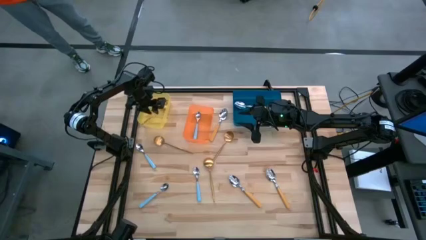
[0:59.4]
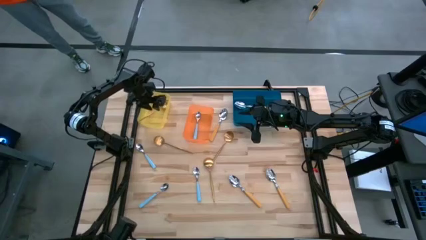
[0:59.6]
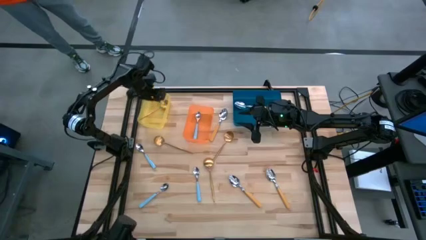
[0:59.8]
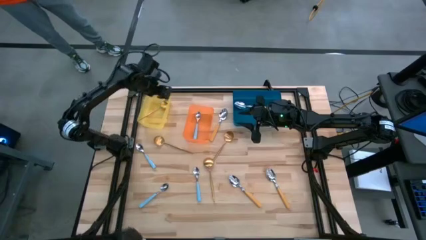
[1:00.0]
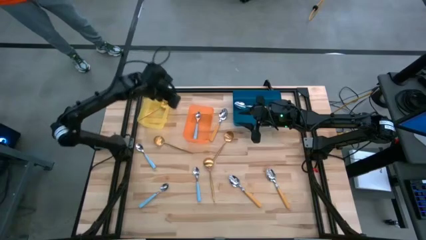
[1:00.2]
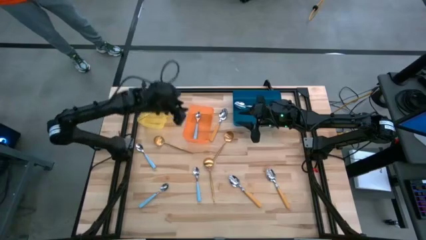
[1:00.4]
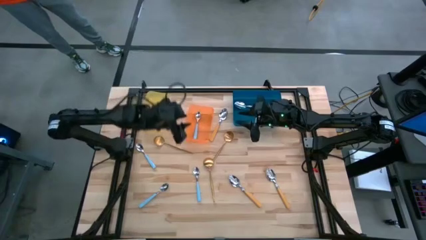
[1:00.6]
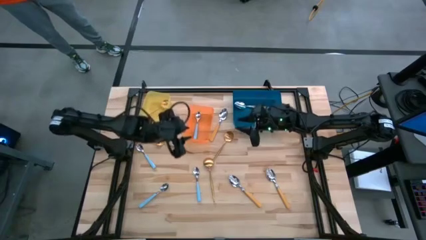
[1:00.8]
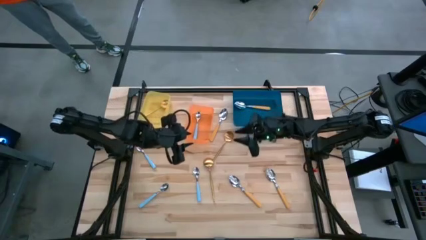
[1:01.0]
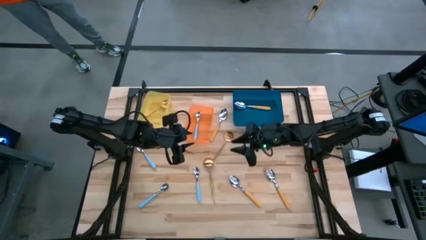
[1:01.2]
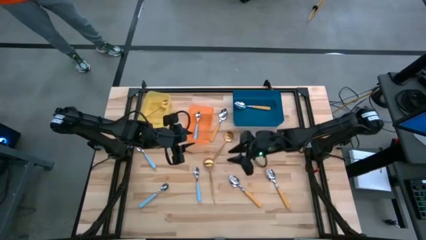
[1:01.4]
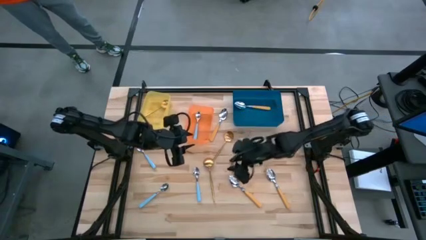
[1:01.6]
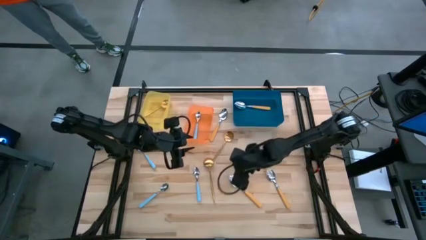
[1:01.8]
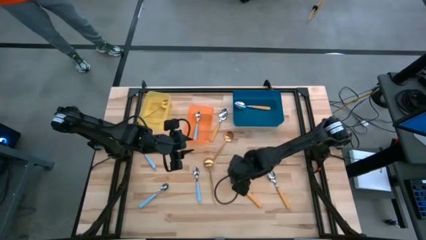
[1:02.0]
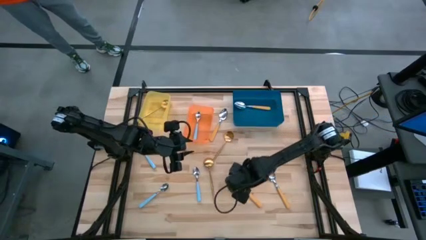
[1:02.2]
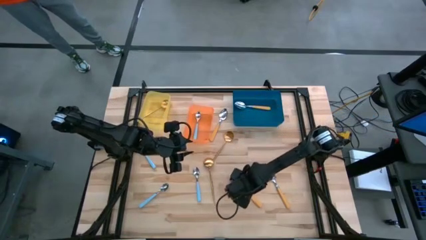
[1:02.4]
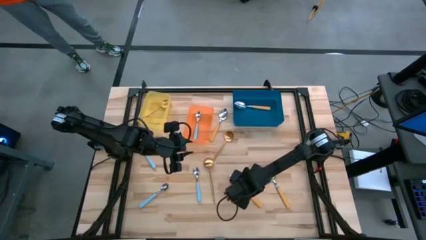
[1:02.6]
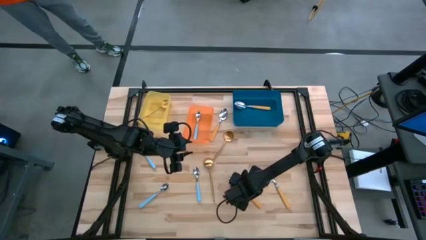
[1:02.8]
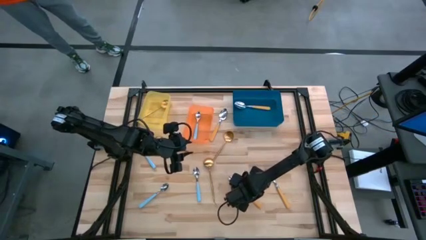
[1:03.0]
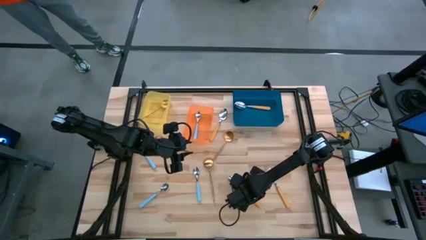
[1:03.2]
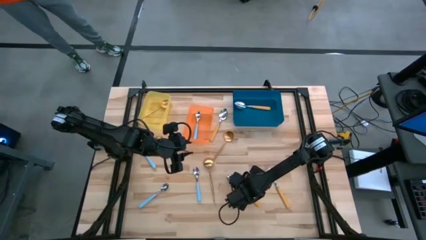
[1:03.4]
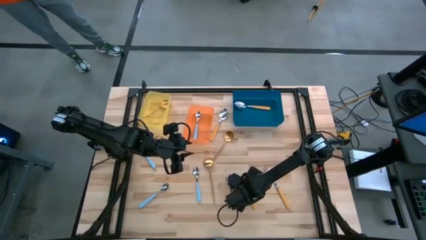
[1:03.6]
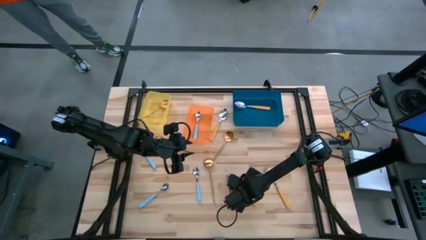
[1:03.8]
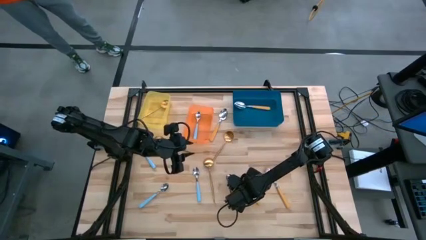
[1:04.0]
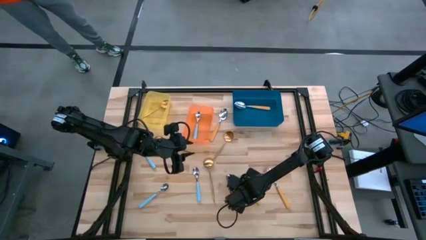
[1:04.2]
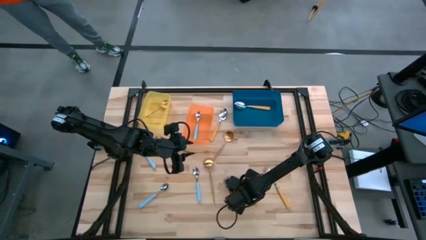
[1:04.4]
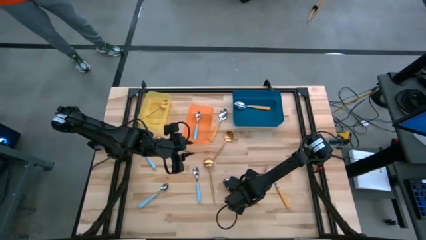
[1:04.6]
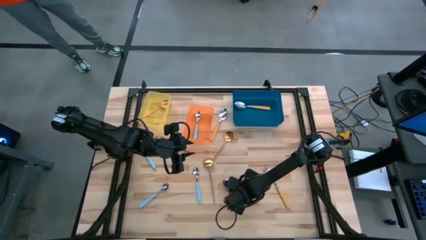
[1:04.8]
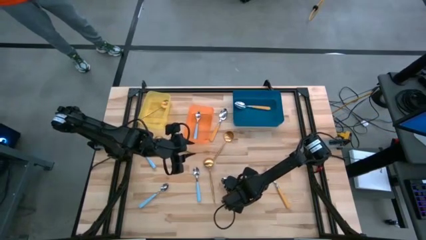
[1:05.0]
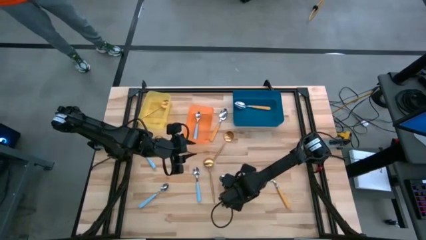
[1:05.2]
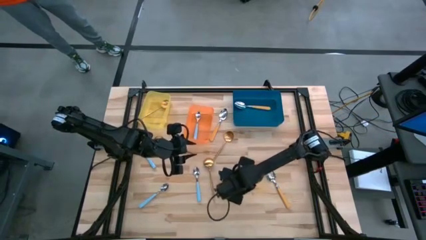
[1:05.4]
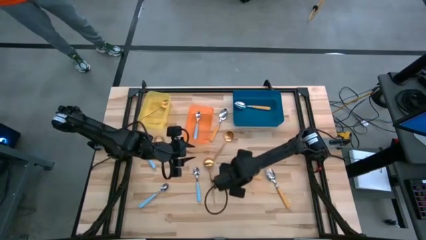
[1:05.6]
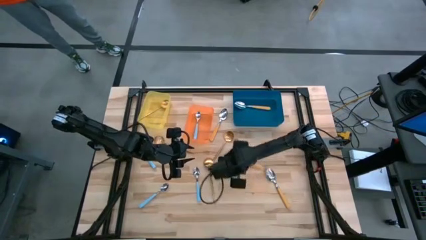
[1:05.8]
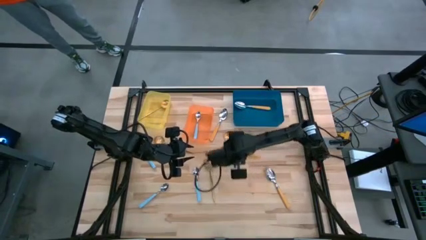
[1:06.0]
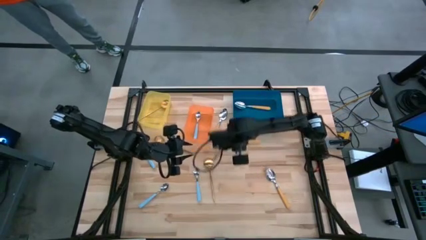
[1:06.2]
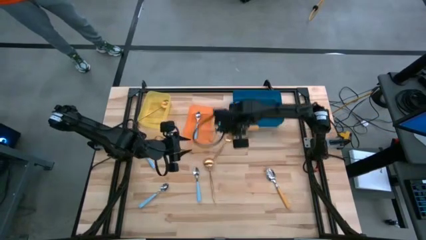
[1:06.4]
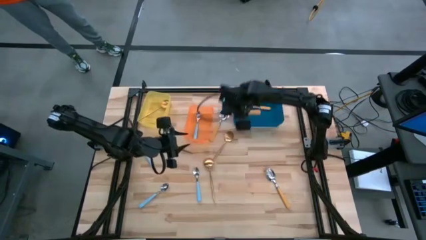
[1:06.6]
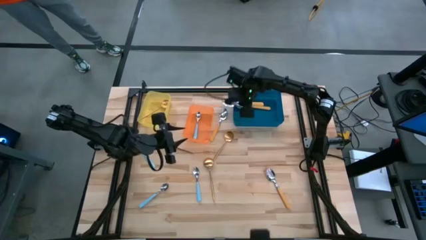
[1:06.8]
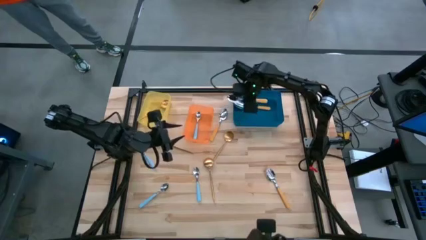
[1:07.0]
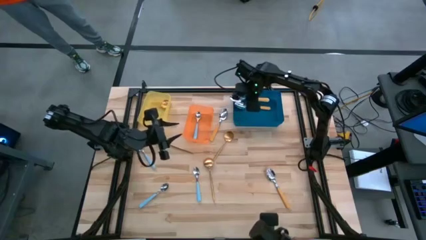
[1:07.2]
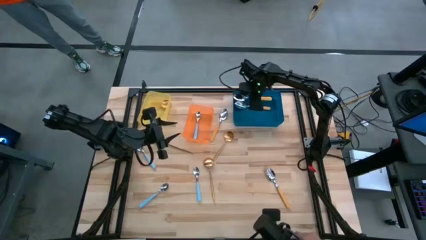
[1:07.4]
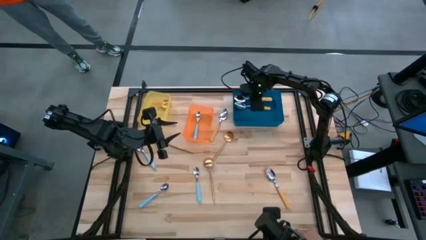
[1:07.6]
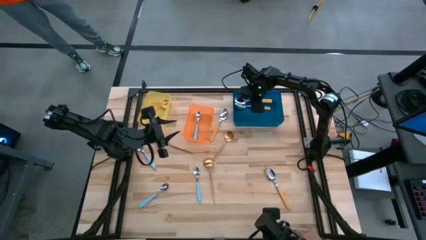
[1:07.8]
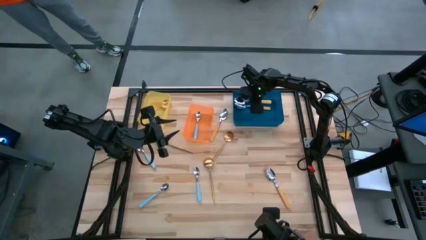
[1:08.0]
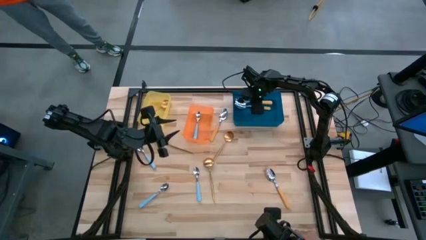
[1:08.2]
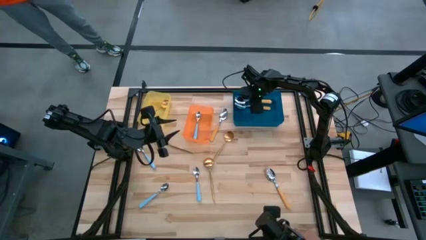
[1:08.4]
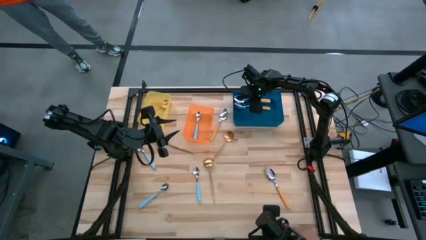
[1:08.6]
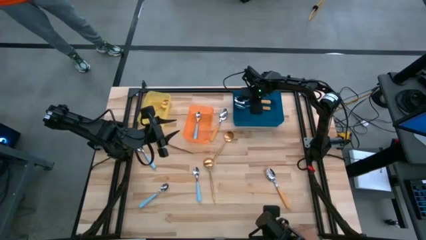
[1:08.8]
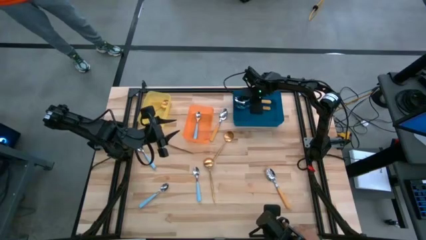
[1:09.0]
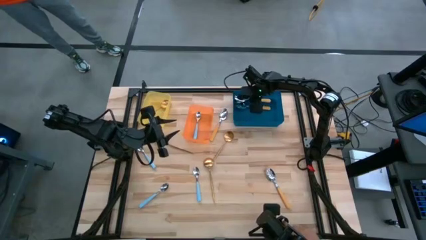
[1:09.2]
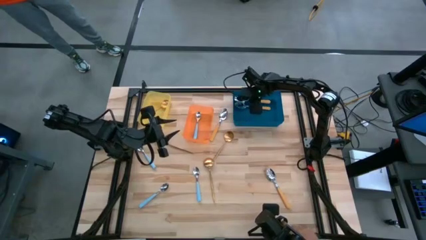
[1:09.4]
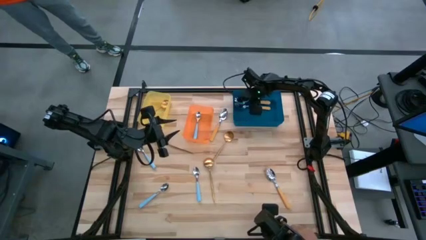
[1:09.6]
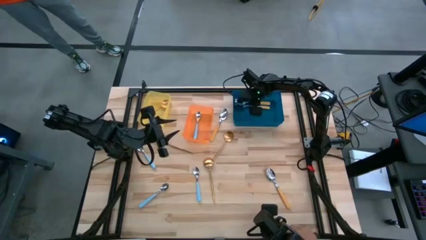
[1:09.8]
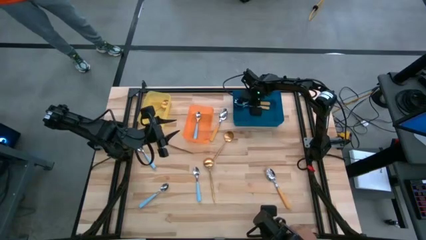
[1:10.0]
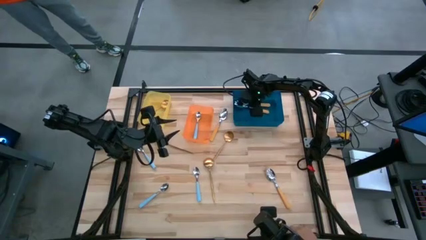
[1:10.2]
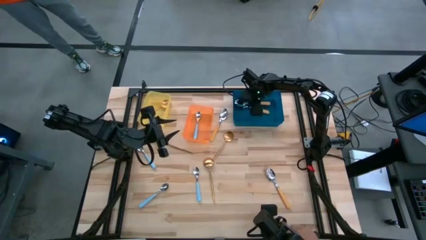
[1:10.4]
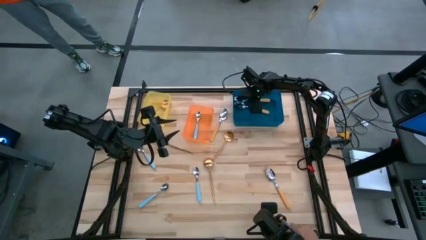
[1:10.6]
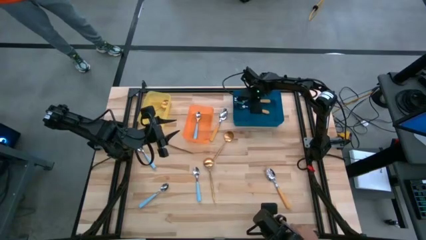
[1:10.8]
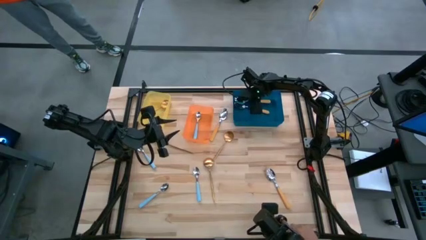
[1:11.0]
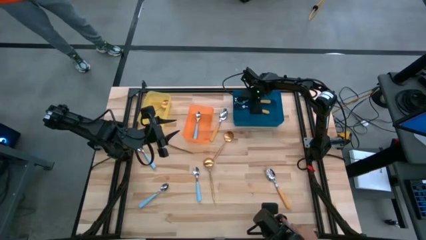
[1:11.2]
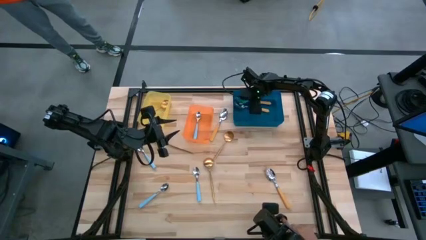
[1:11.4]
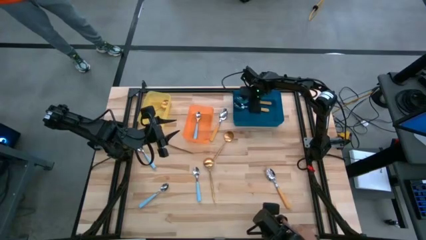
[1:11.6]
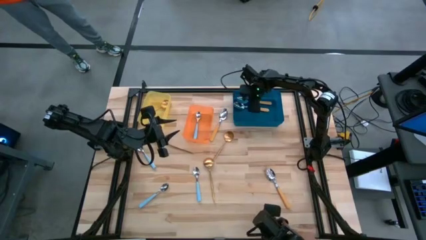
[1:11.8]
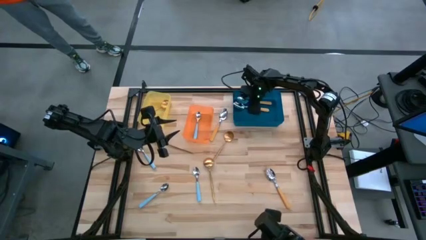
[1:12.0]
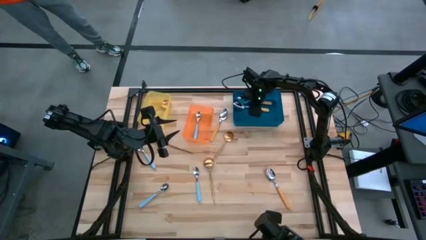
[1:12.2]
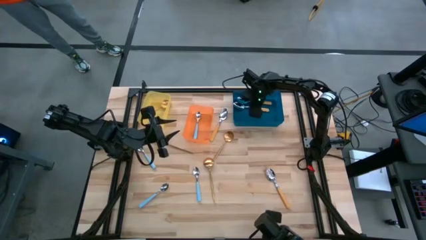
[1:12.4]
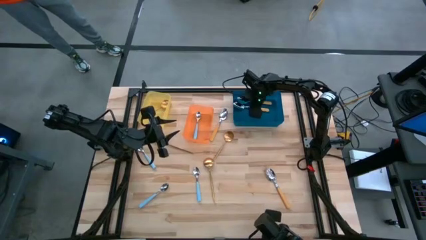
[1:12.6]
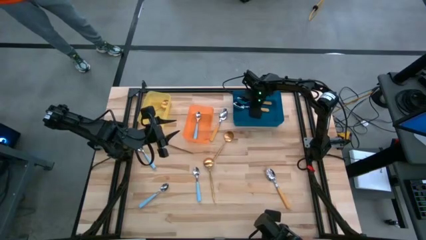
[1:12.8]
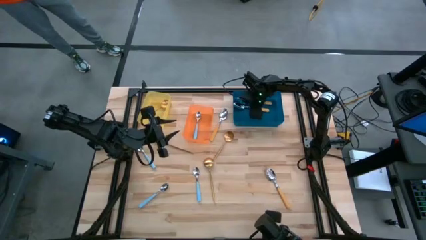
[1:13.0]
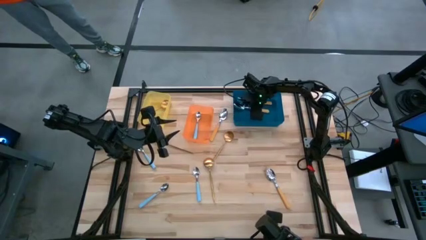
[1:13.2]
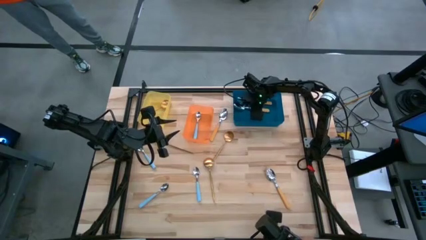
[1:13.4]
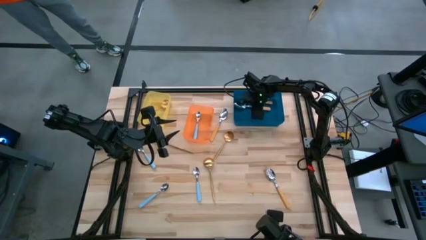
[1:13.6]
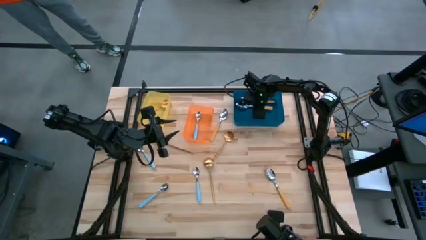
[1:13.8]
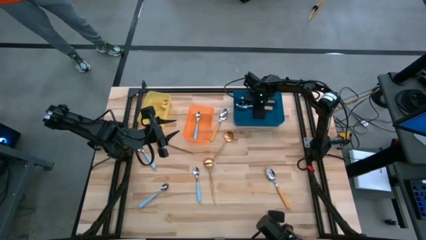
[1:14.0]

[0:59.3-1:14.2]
Task: Sort silverware by color (type)
Put the yellow spoon into the blue bin
